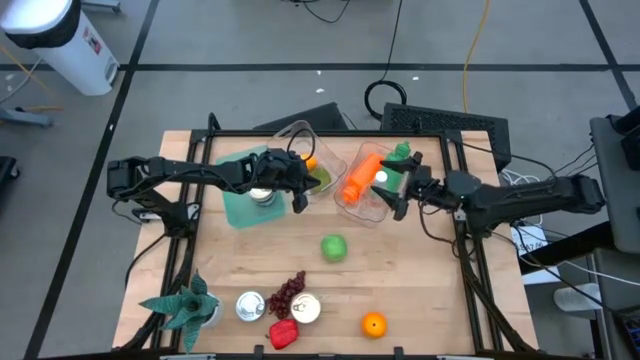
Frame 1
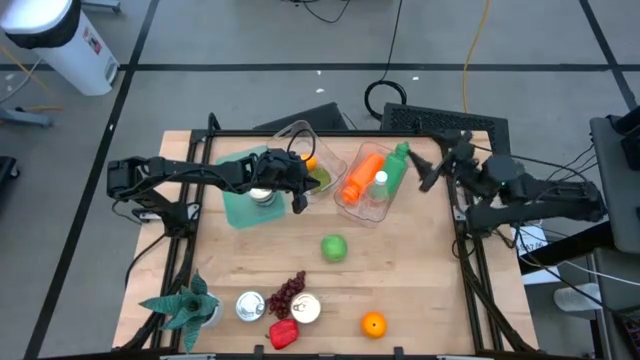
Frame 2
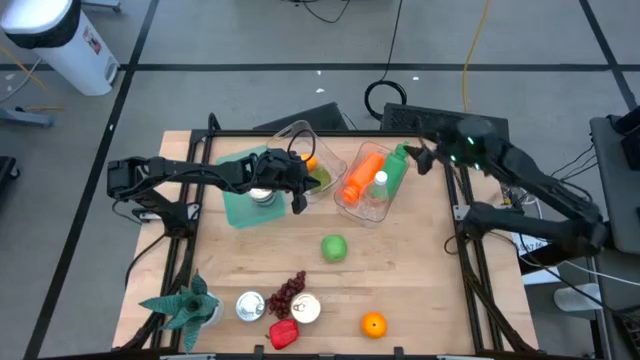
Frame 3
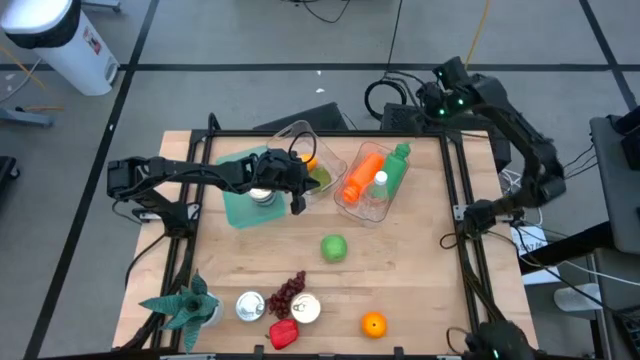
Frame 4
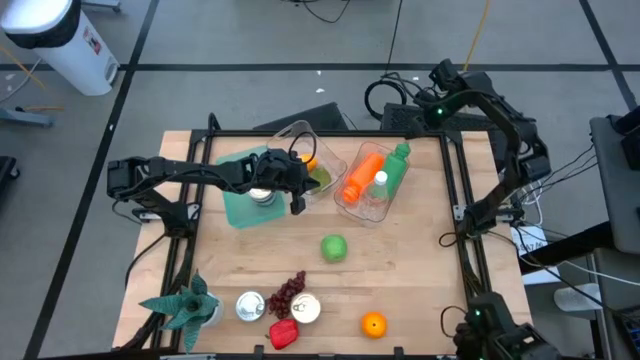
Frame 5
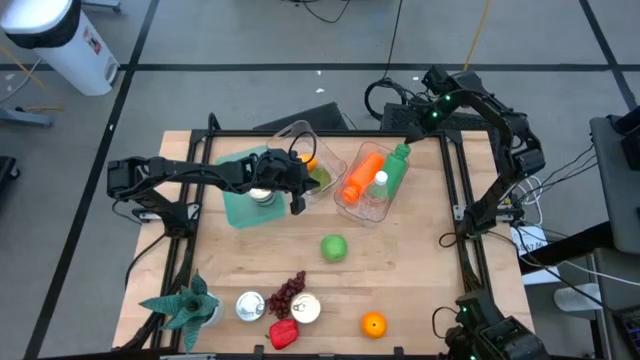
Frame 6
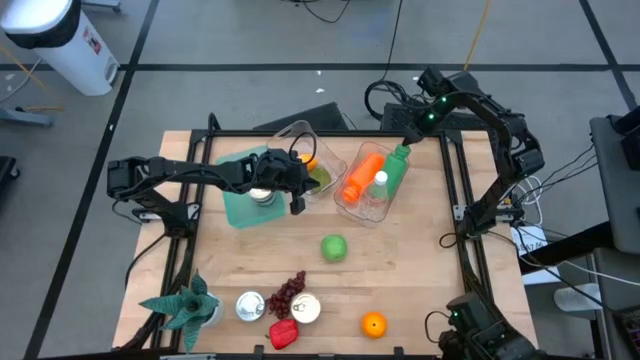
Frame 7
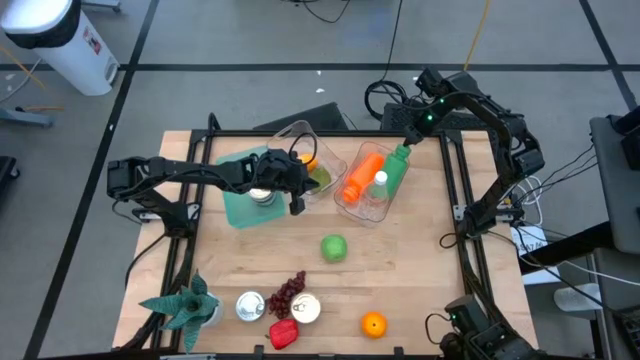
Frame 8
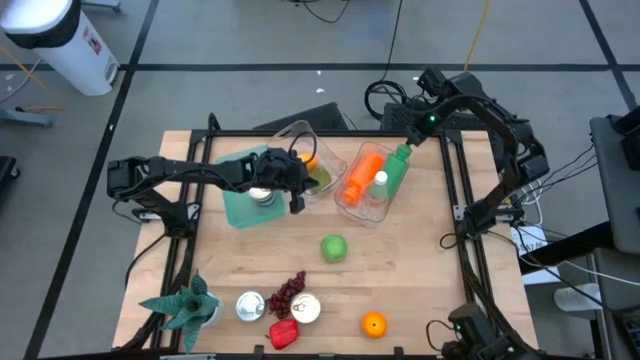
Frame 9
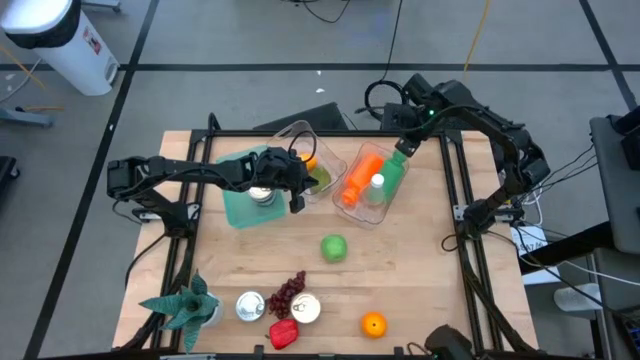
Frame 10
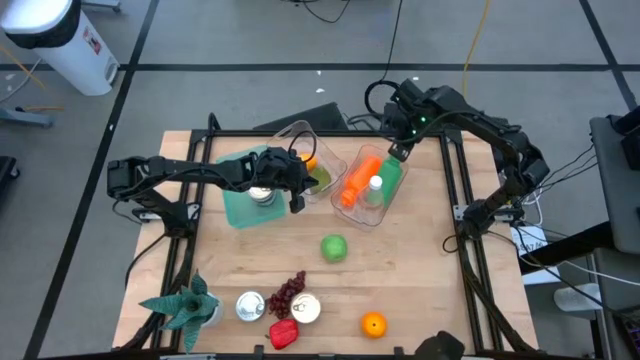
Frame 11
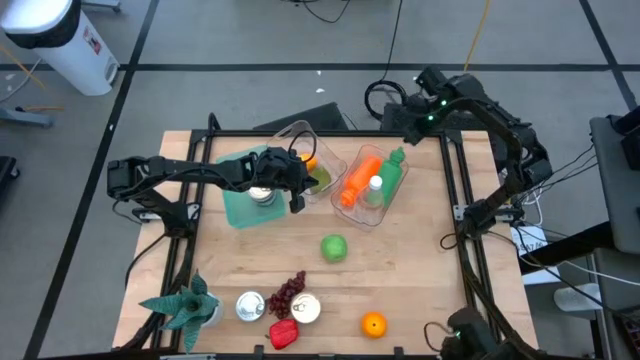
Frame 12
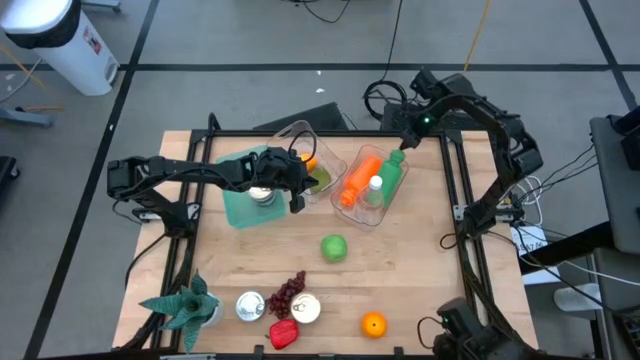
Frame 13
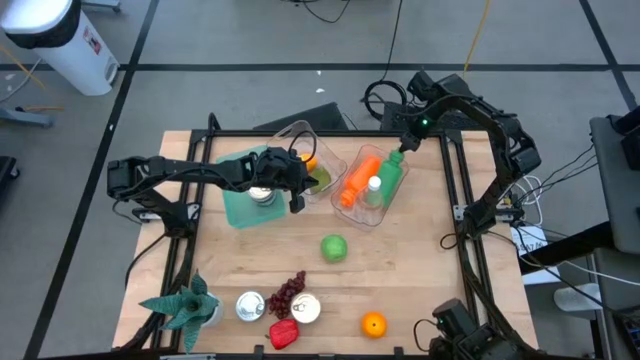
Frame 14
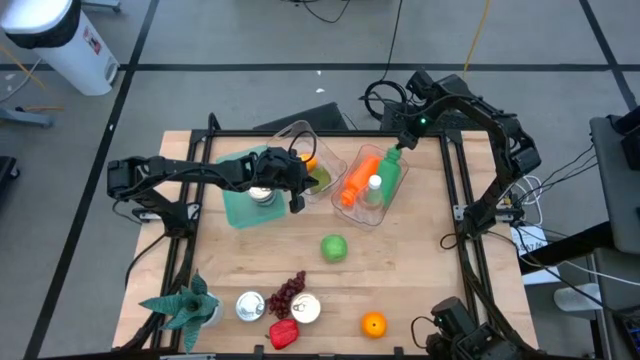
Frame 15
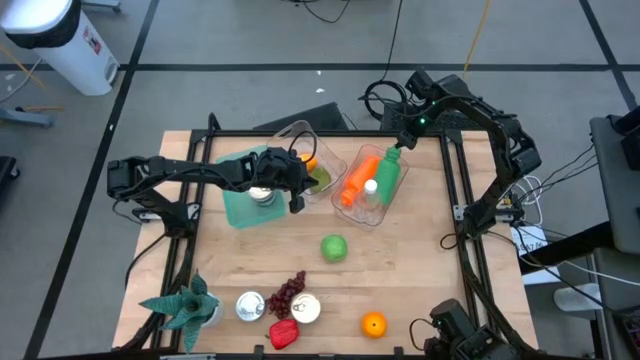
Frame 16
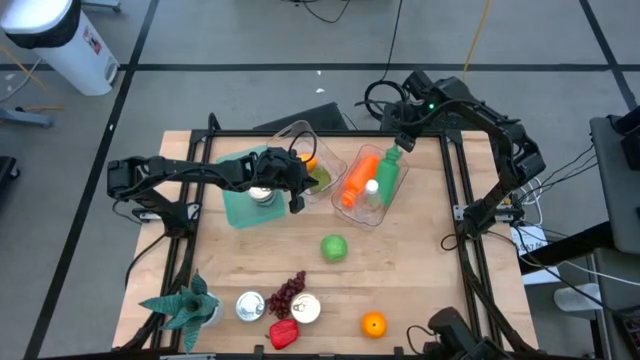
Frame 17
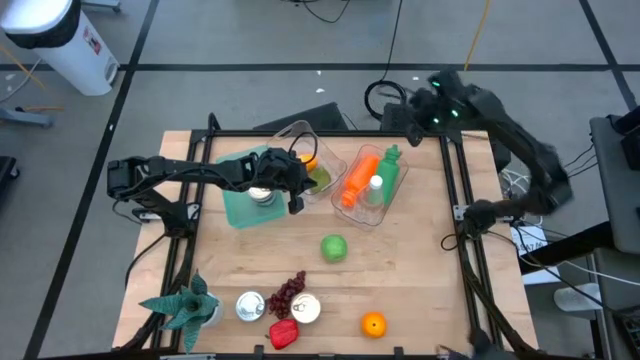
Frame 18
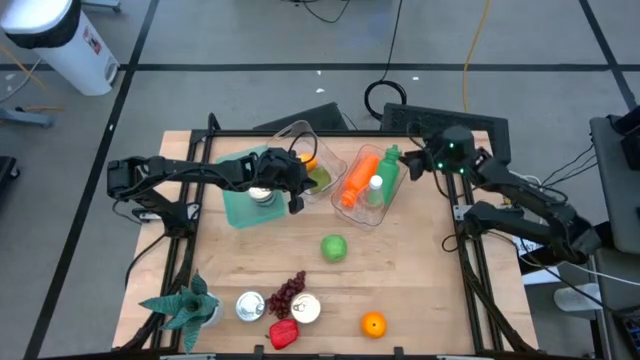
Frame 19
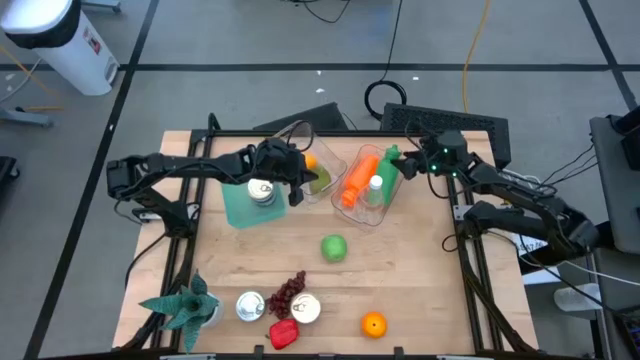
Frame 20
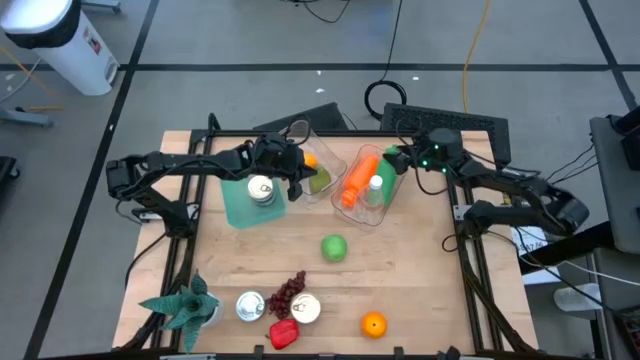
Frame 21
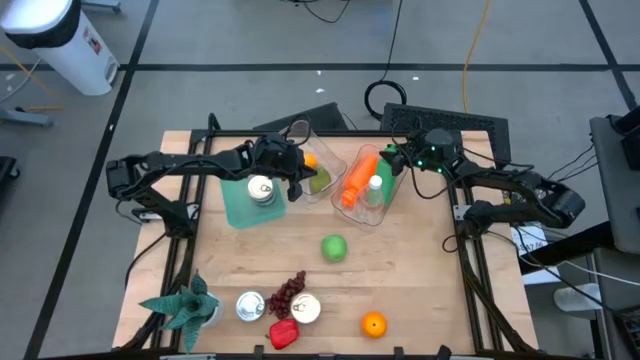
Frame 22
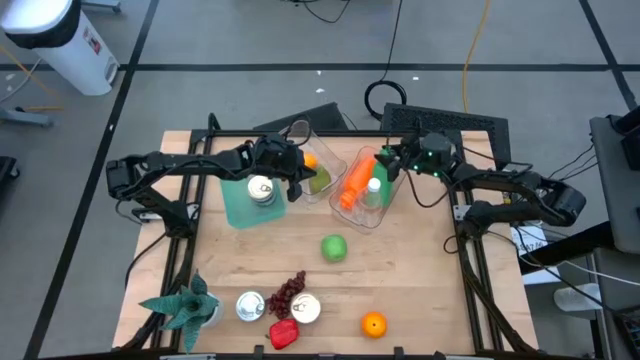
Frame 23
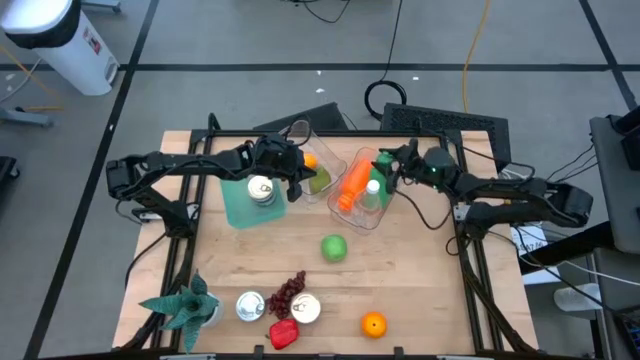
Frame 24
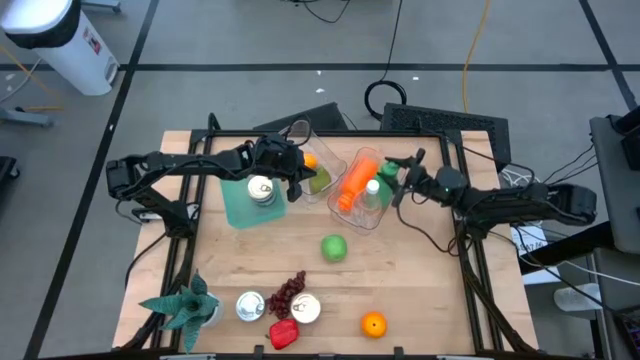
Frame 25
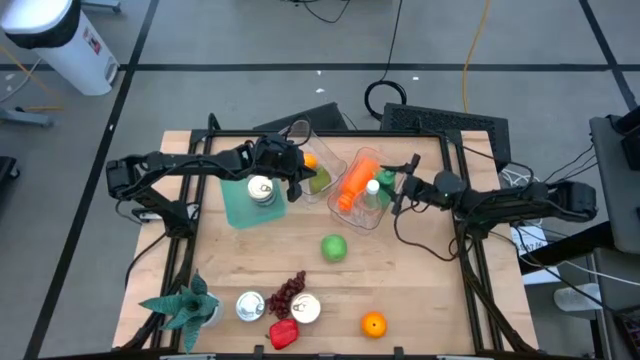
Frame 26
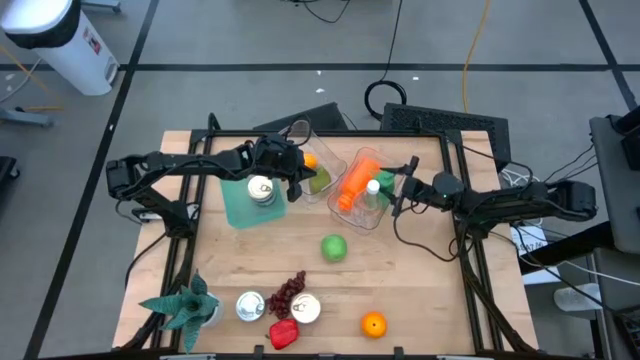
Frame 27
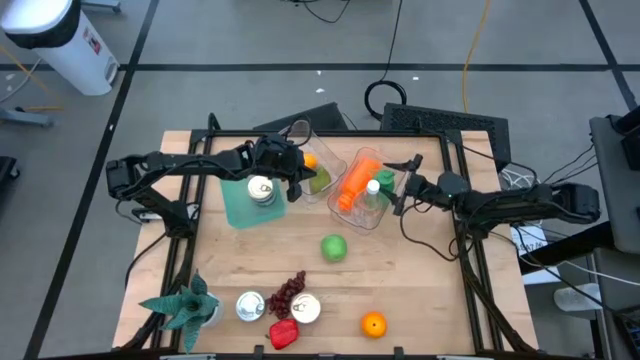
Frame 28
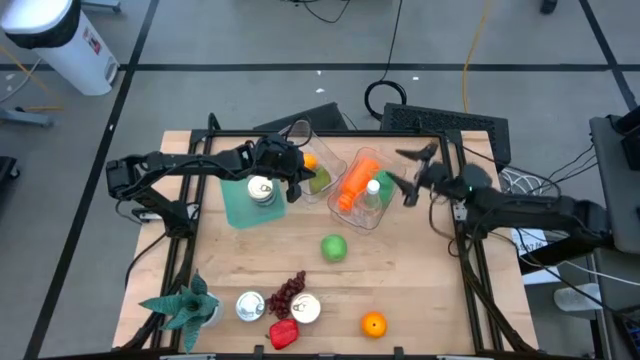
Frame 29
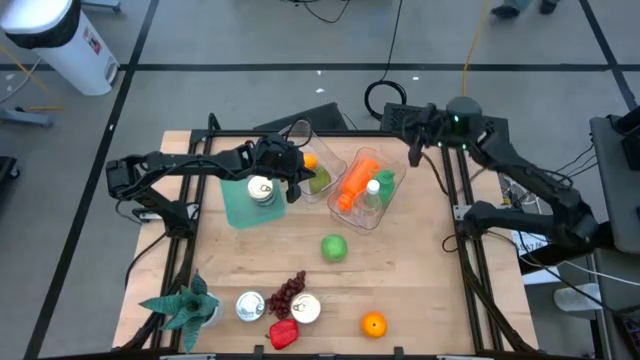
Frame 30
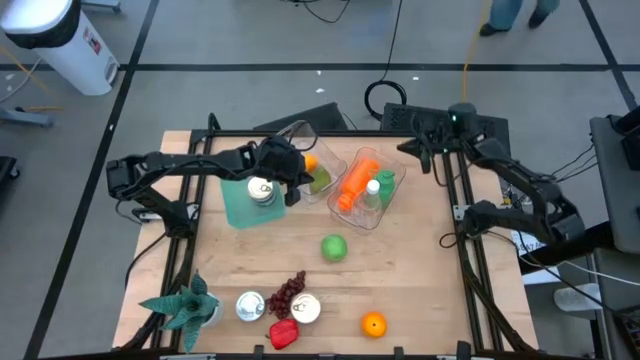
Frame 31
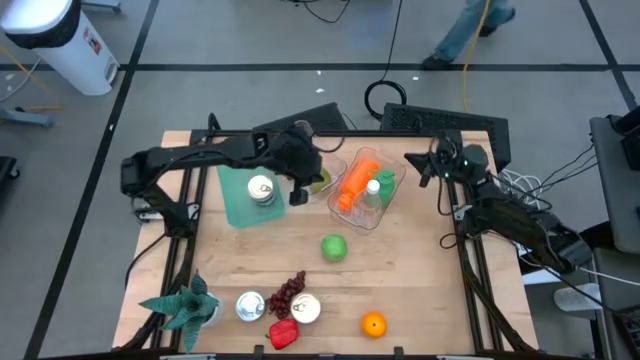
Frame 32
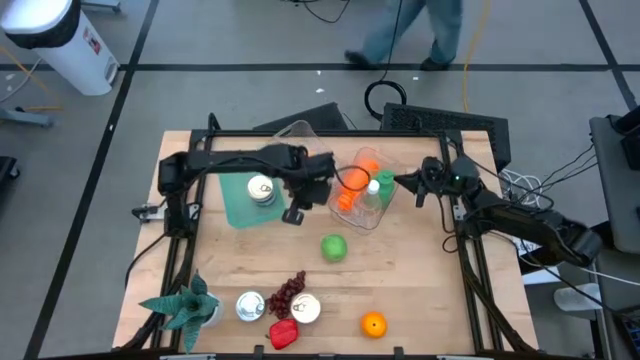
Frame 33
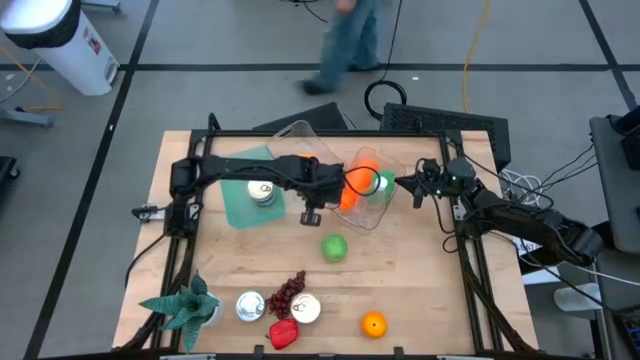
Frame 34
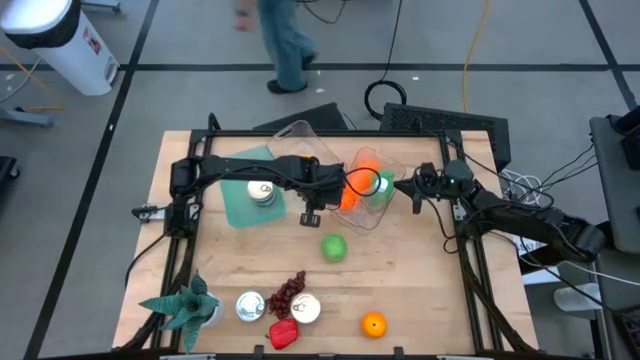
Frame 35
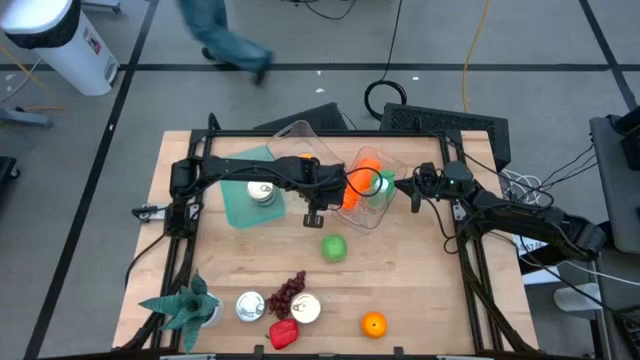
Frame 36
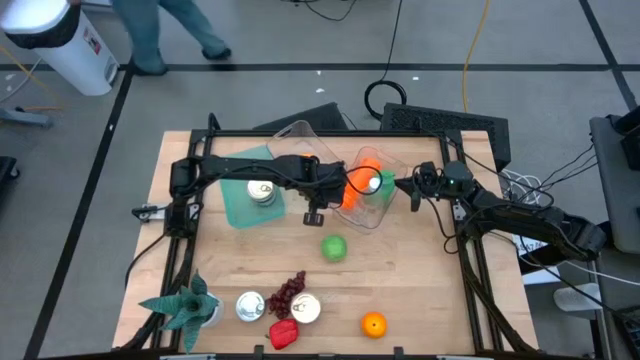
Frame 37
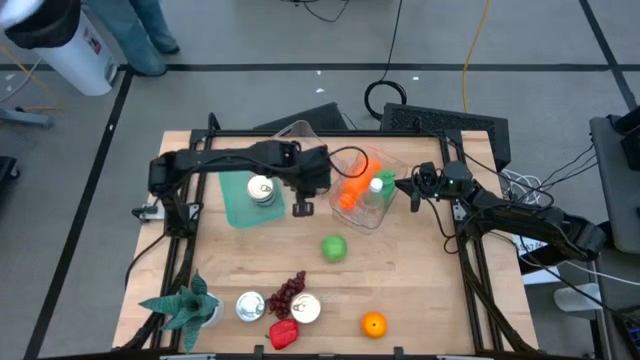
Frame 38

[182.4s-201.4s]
Task: Pick & Place Food Item
Adjust the green bottle on the right transparent bin

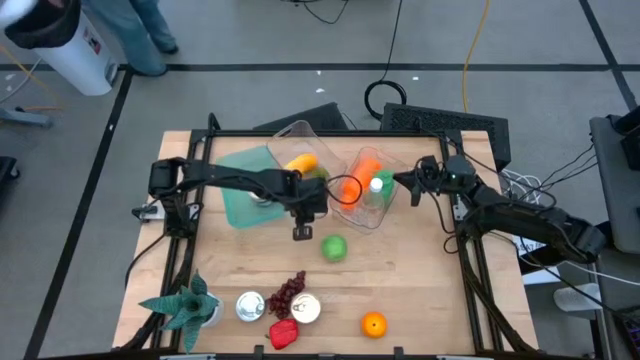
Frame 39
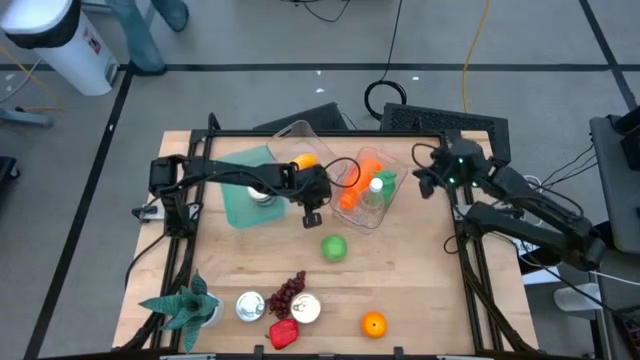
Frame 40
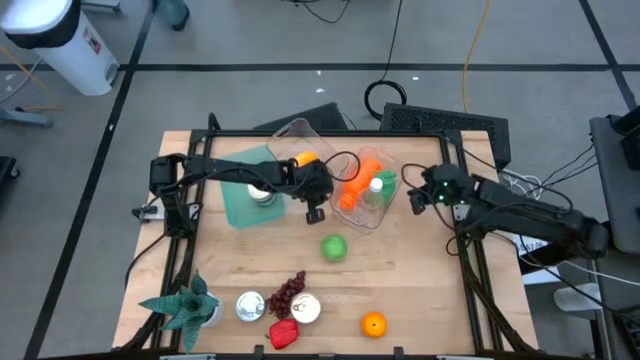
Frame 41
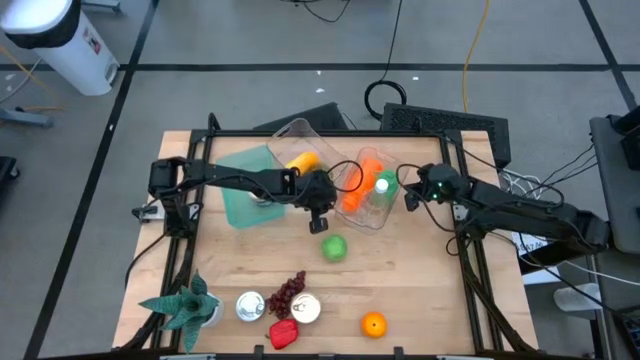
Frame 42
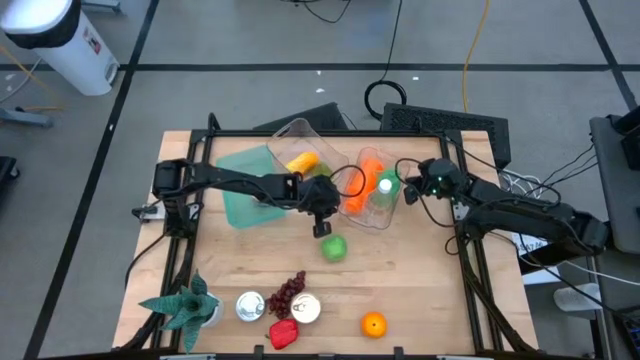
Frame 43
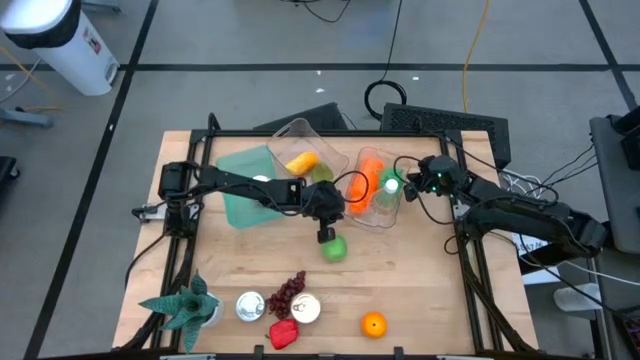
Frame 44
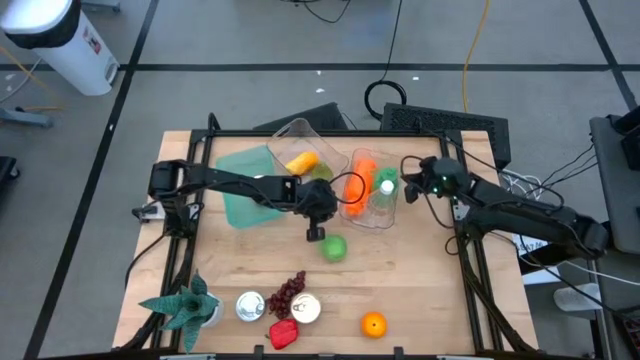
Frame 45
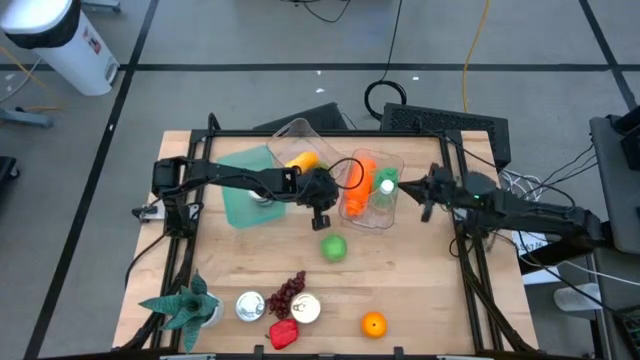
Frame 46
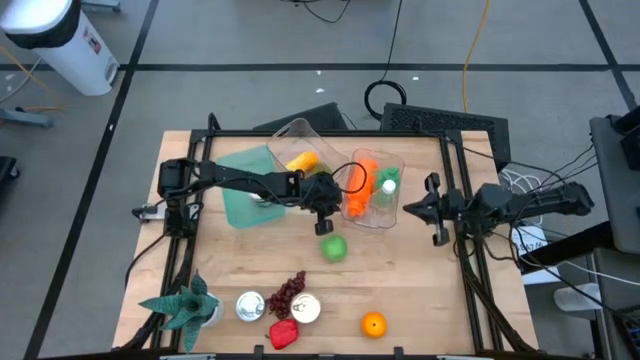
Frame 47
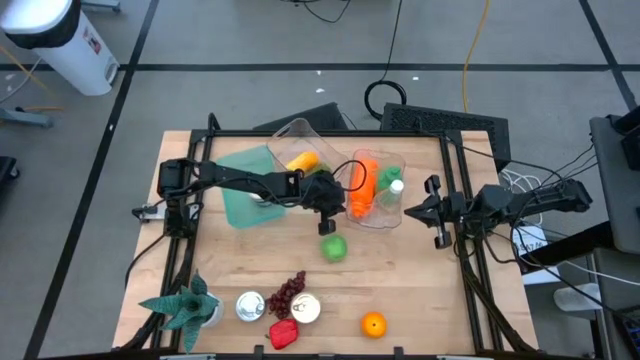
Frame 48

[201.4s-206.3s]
Adjust the right transparent bin
